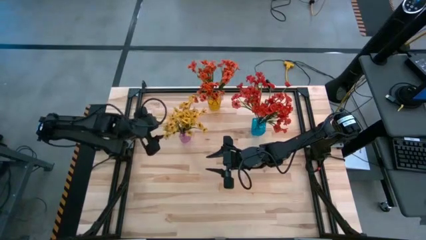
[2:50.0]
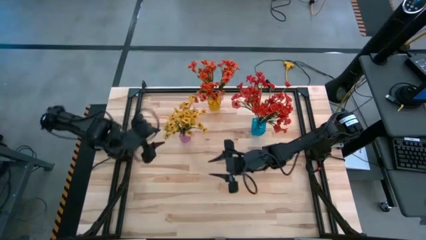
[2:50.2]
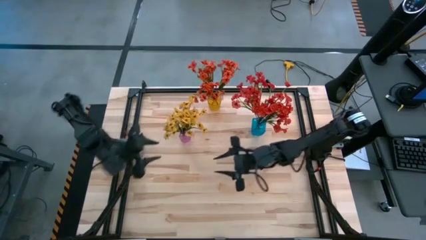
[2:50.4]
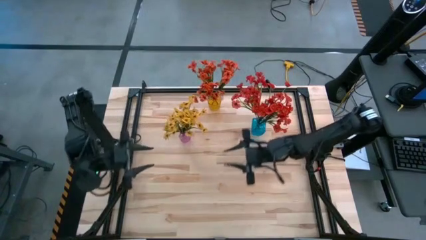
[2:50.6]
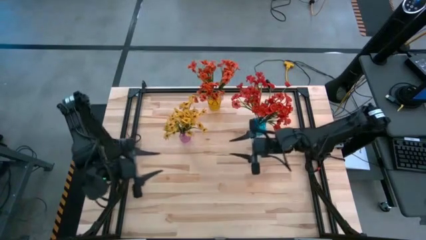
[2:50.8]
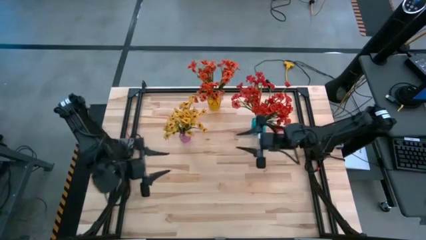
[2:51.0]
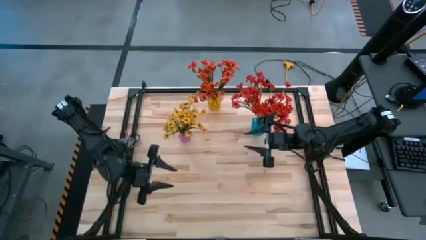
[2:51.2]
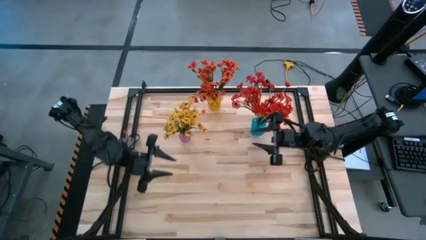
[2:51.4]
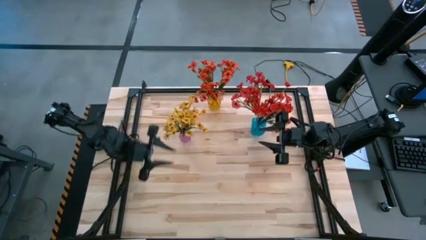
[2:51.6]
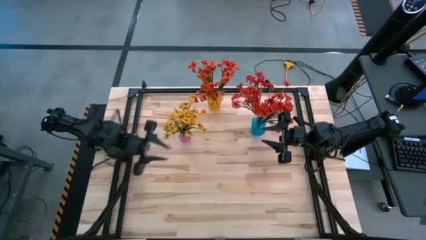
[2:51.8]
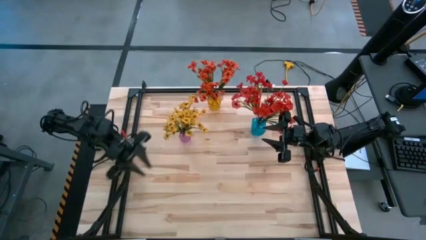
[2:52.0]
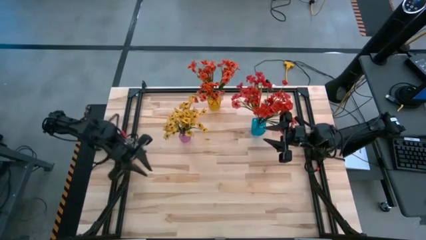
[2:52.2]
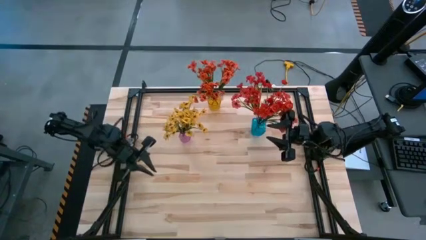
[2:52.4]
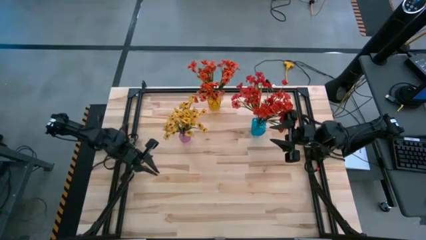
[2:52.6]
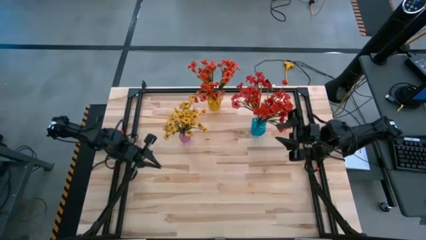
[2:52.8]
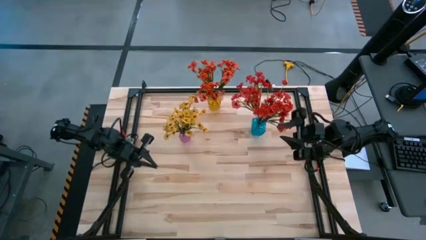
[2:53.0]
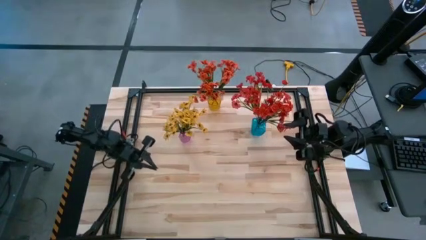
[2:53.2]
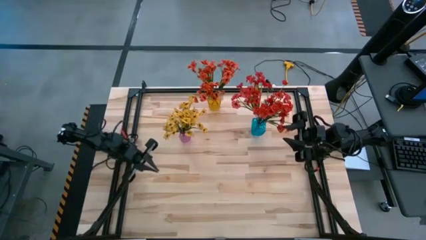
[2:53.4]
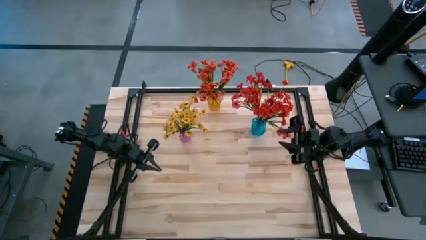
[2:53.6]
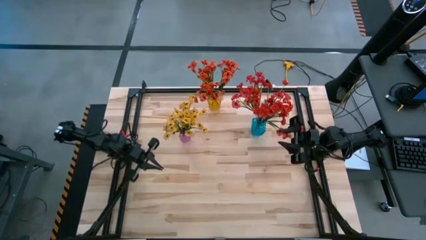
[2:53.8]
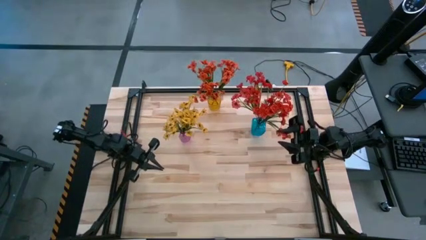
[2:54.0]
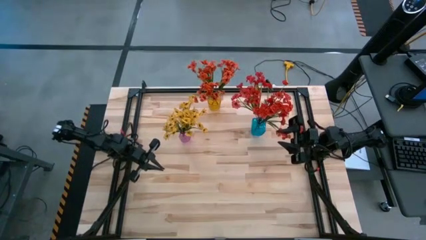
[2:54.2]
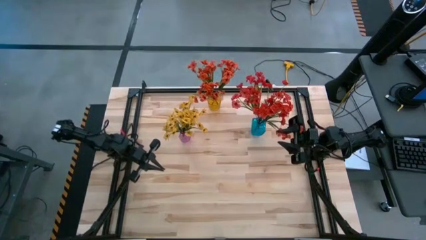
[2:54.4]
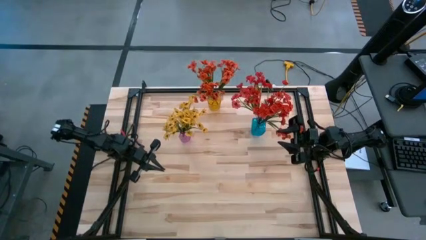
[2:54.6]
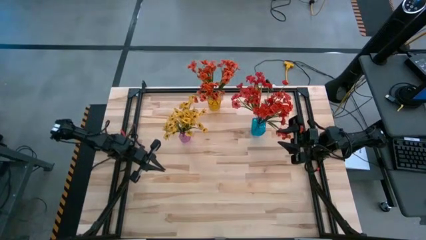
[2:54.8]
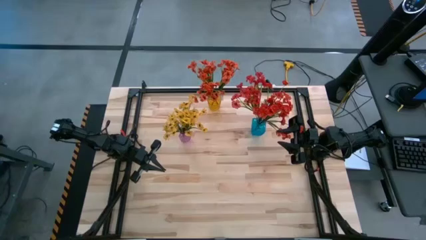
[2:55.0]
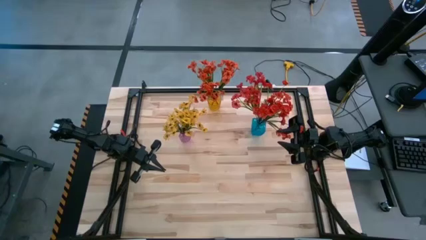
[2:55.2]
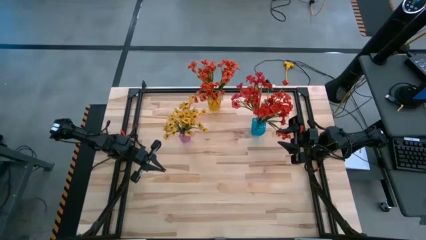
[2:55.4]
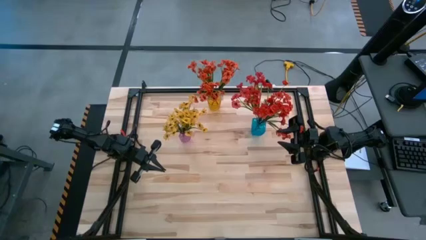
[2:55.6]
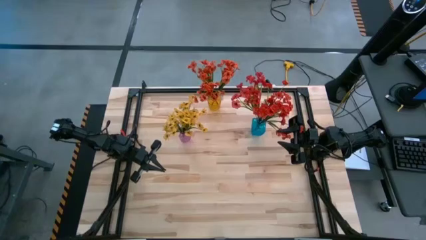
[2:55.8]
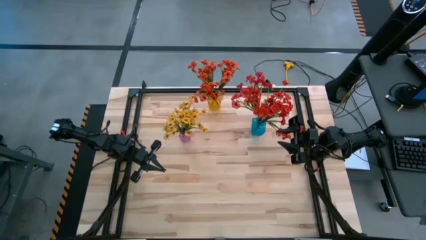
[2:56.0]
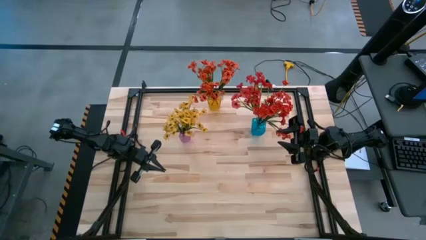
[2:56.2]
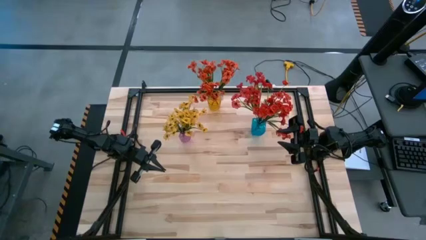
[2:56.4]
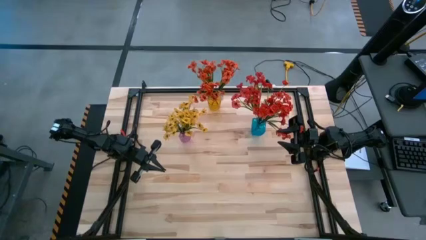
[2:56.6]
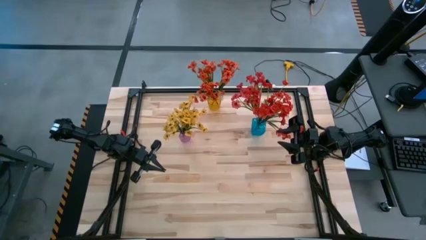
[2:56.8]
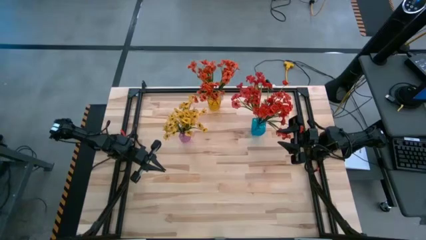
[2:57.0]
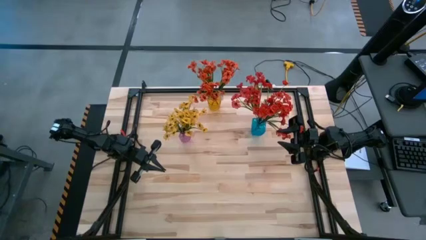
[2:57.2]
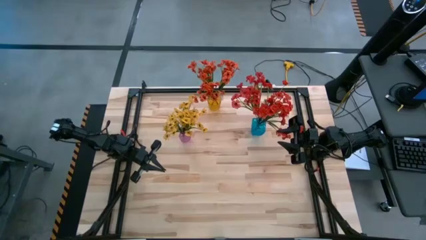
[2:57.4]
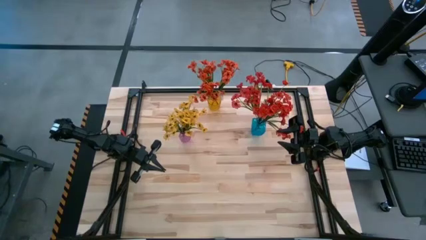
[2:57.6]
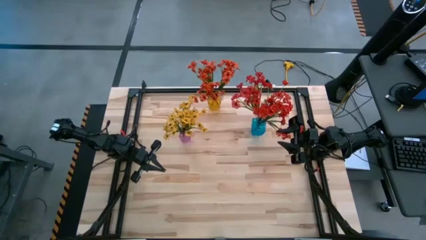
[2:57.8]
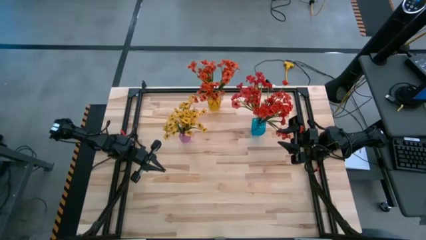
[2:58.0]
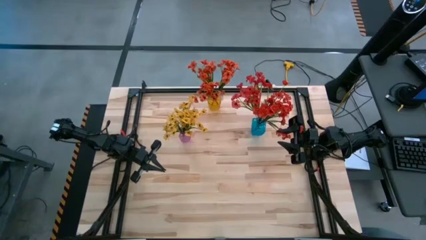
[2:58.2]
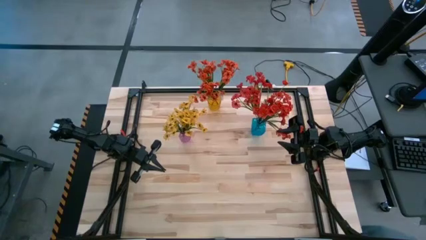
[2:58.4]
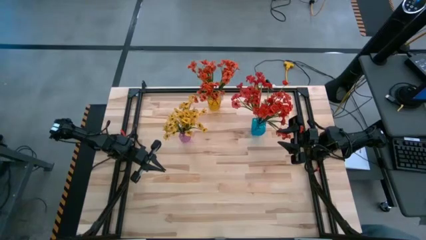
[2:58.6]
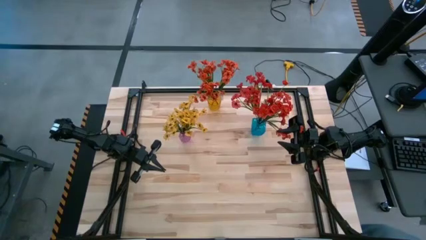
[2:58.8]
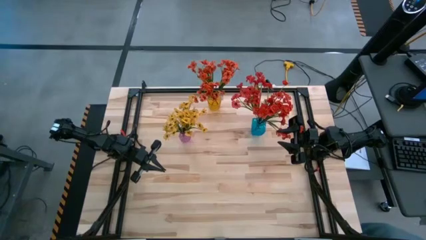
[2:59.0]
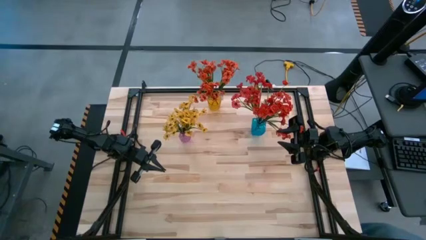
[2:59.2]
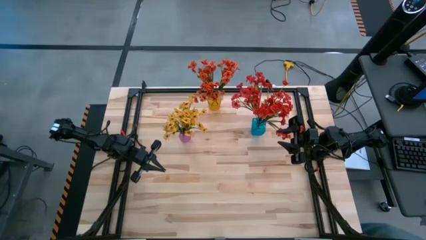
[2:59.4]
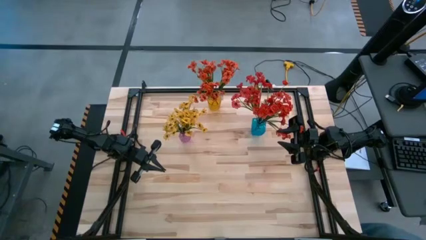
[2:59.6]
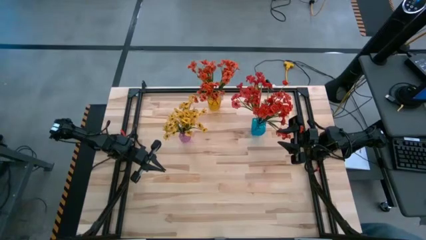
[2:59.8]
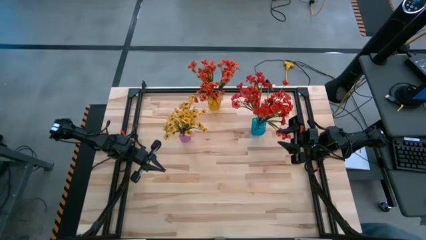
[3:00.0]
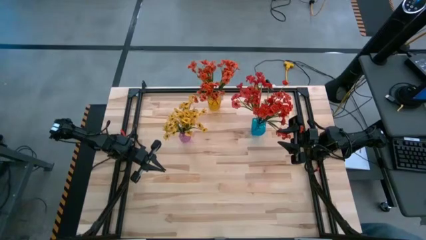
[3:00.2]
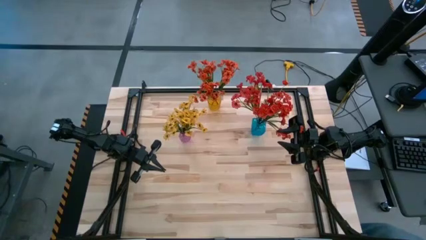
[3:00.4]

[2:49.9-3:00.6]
Task: Sort flowers into vase by color
Return to Home Position

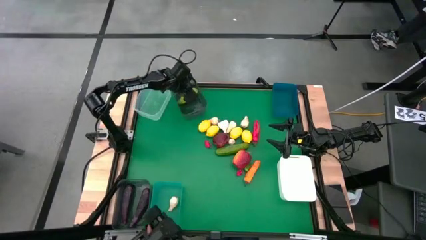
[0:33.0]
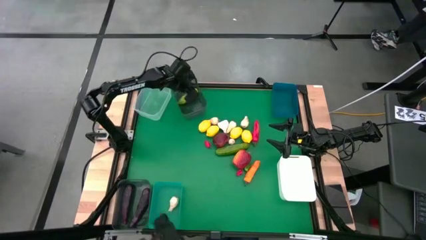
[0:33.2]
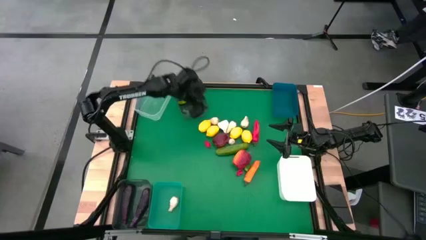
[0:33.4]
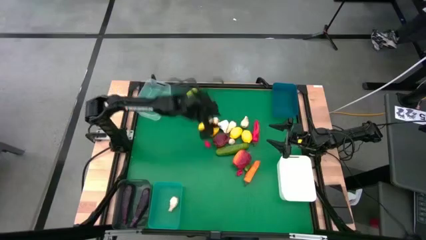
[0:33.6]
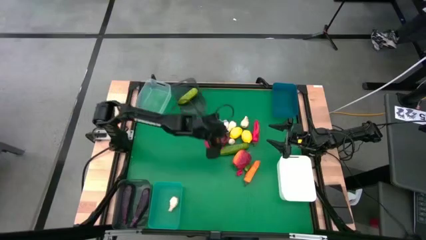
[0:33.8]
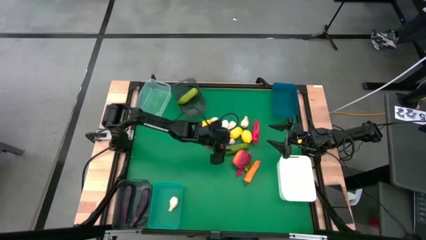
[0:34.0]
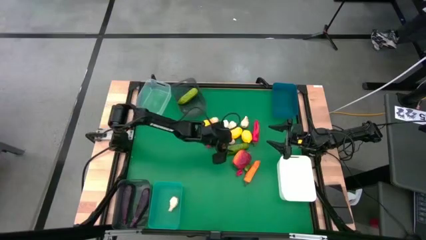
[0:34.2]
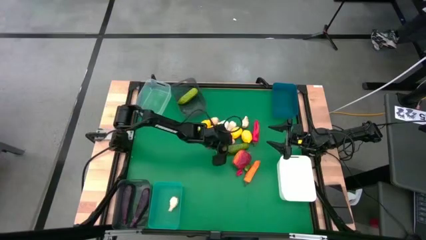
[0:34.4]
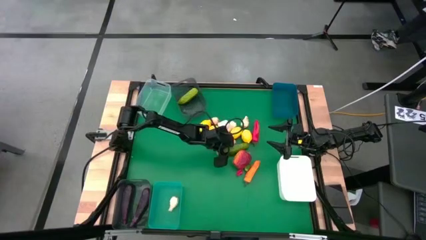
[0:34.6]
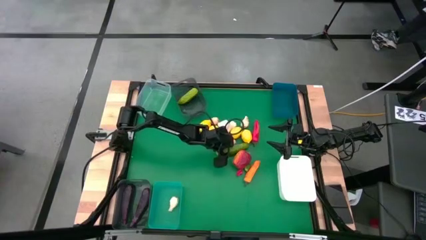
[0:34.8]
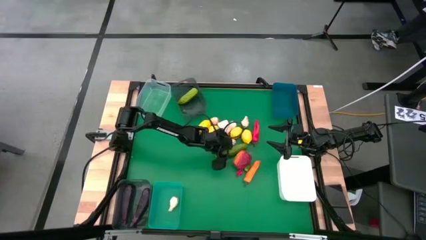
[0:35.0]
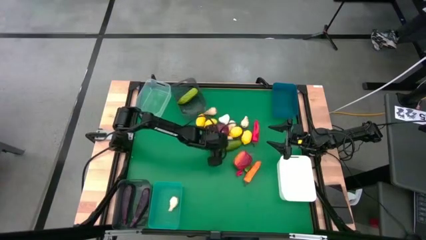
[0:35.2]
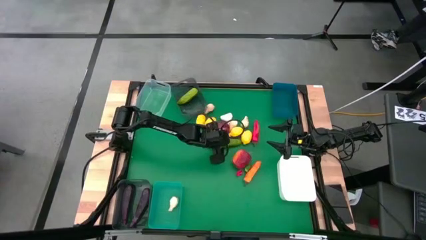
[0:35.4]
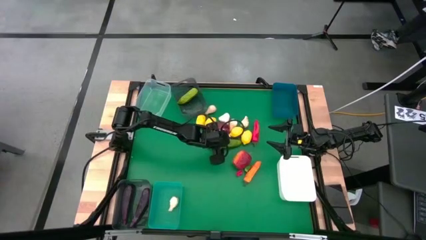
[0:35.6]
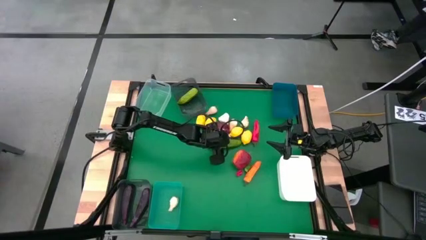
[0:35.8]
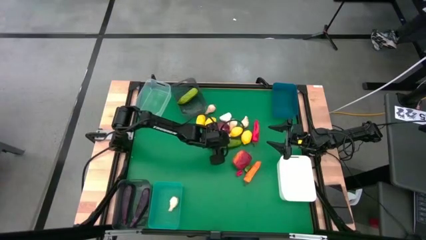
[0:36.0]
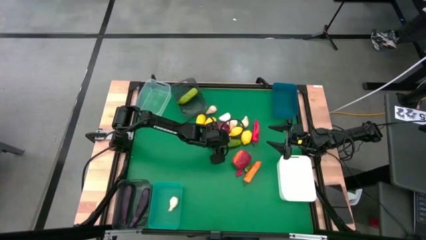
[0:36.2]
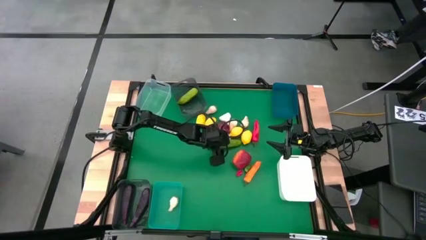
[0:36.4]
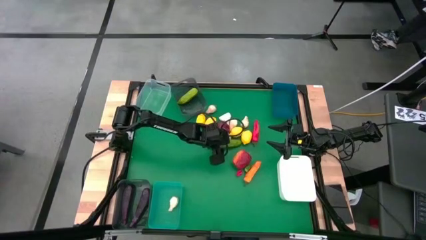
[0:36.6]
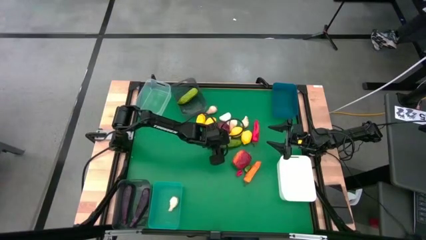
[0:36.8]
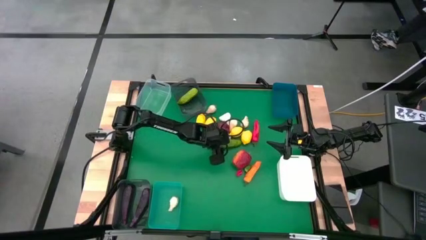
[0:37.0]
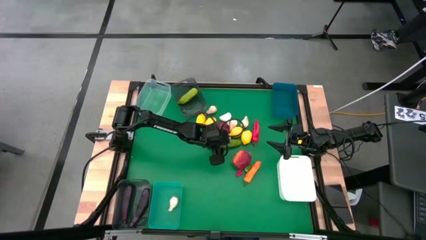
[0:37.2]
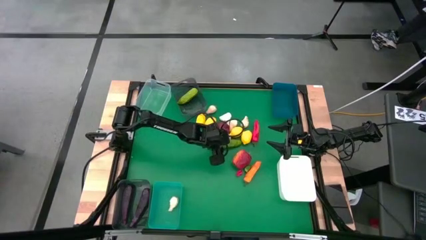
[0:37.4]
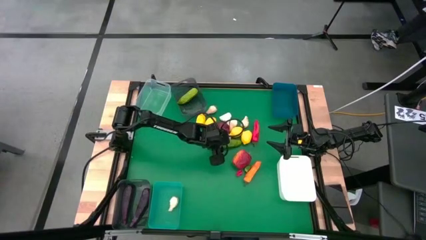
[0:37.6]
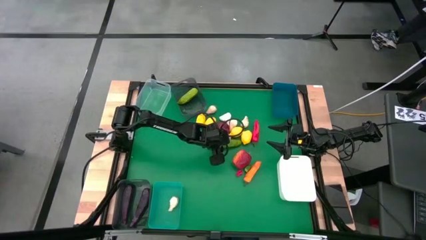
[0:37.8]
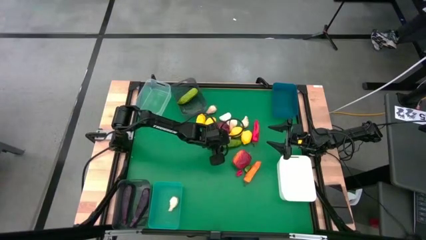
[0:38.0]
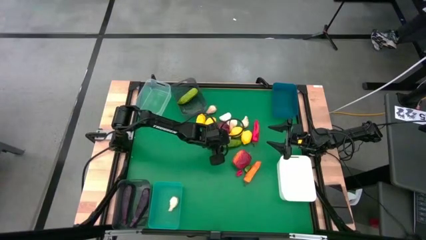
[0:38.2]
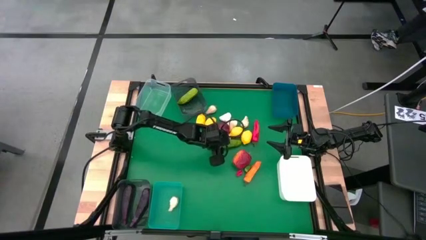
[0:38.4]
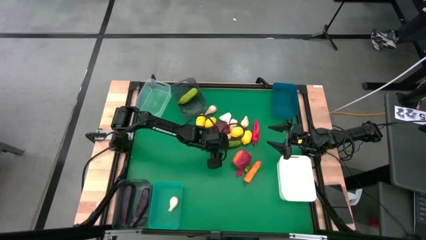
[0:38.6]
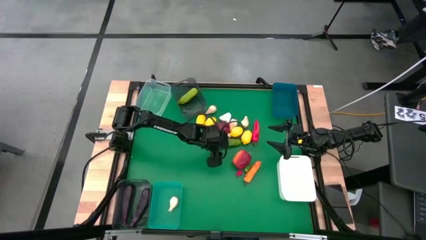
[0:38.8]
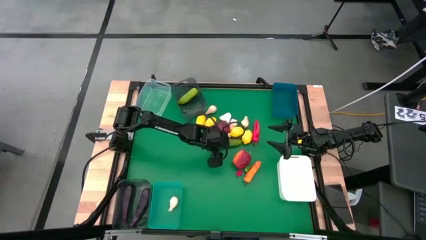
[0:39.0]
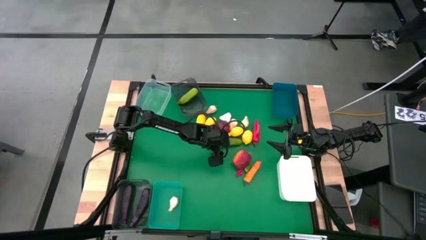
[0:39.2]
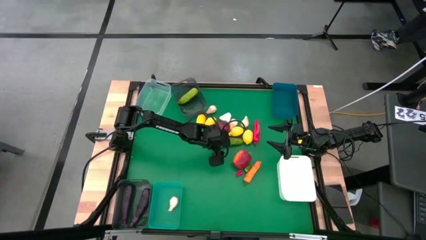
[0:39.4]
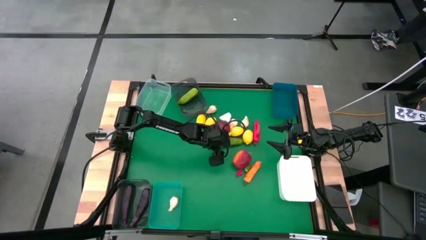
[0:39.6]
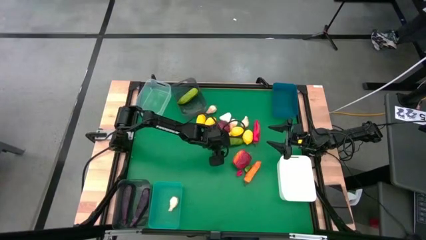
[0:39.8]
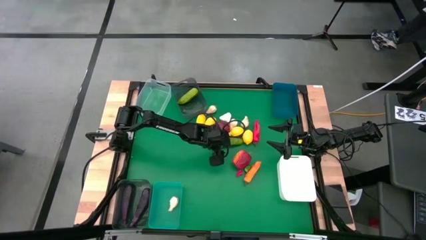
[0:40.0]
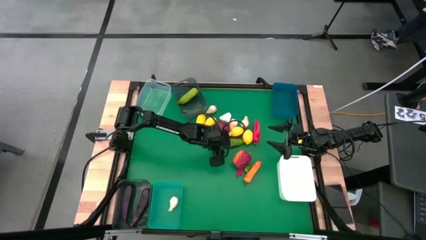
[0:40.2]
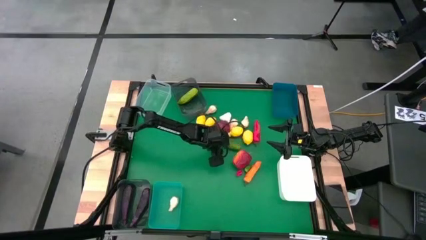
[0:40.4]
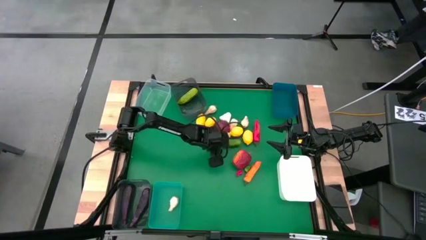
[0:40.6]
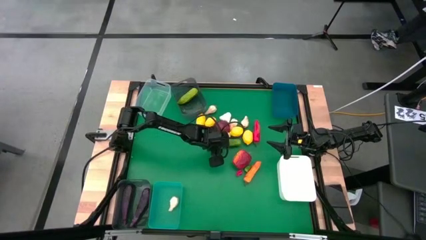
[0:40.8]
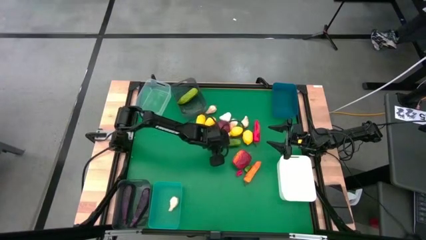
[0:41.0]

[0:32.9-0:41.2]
Task: Sort produce into baskets
Put the cucumber into the top black bin
